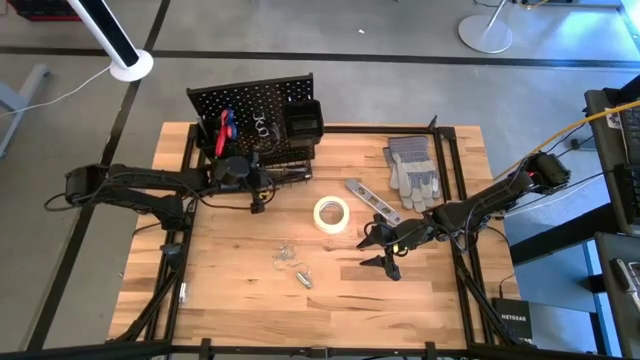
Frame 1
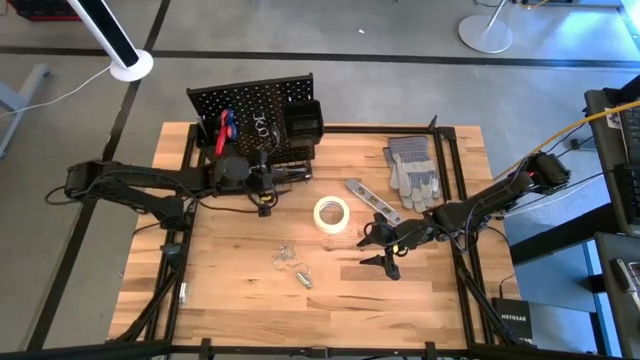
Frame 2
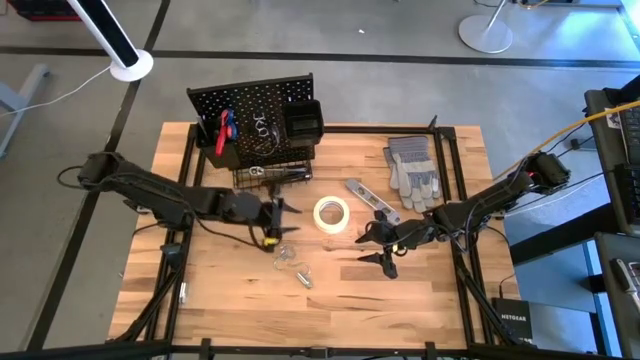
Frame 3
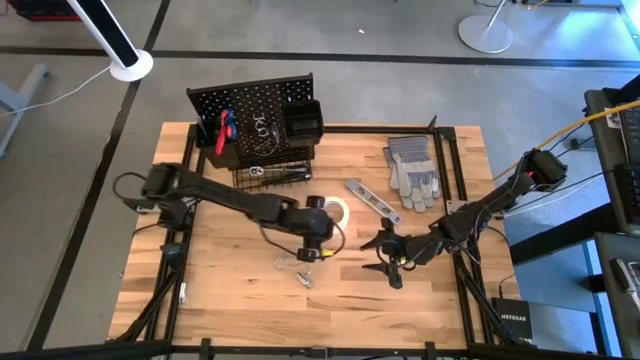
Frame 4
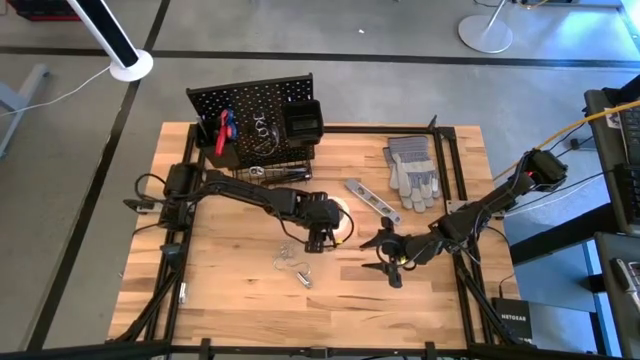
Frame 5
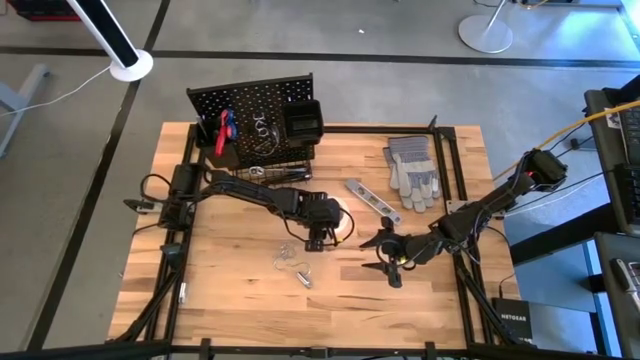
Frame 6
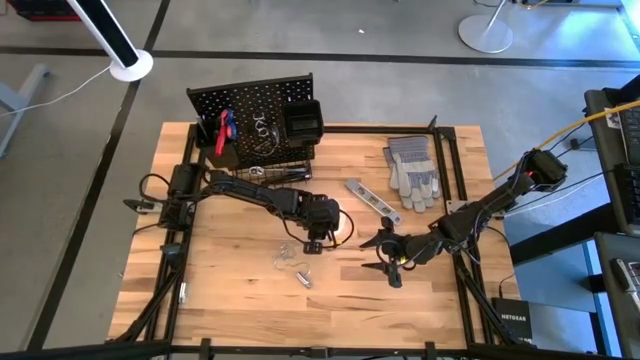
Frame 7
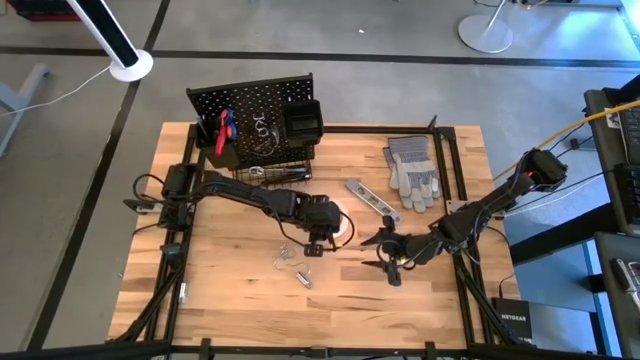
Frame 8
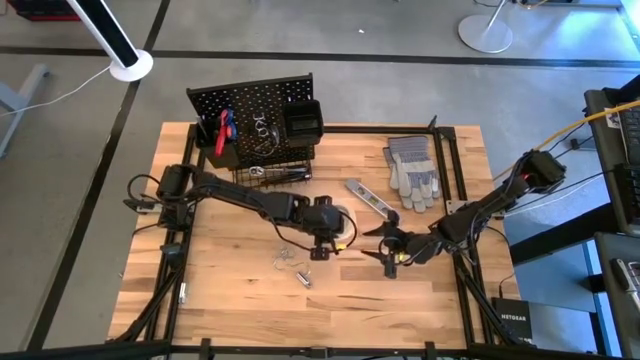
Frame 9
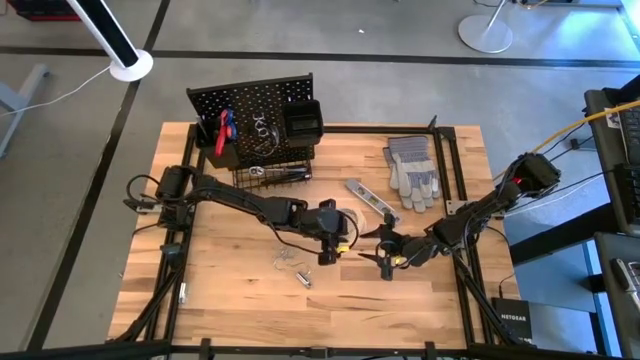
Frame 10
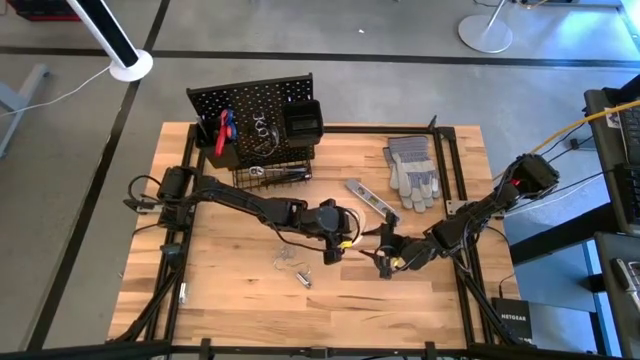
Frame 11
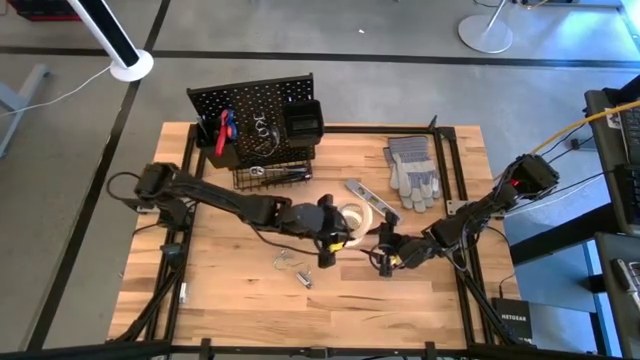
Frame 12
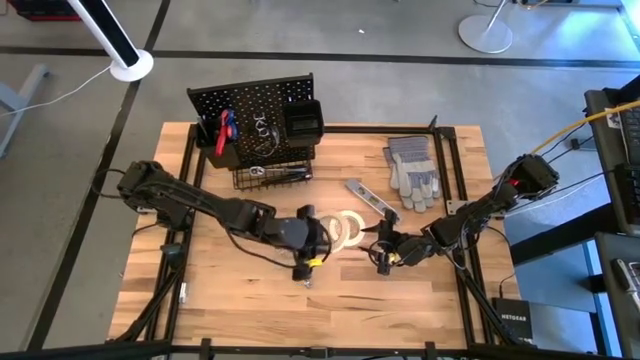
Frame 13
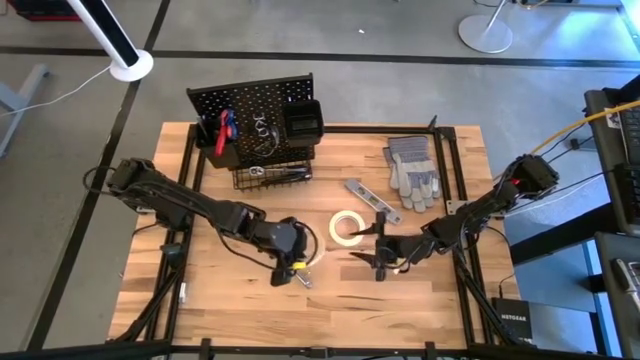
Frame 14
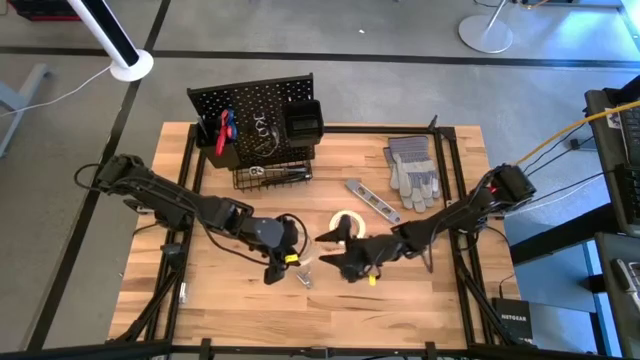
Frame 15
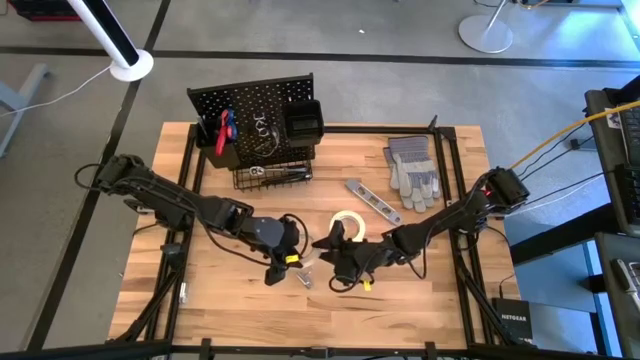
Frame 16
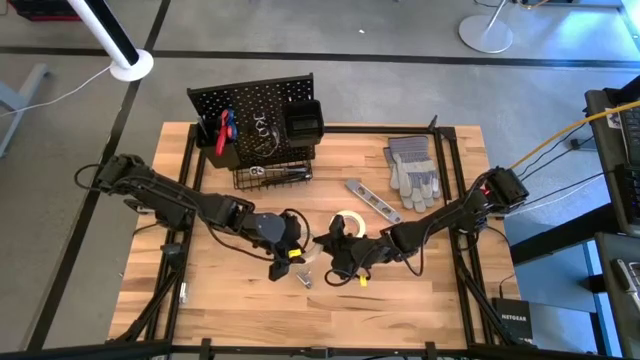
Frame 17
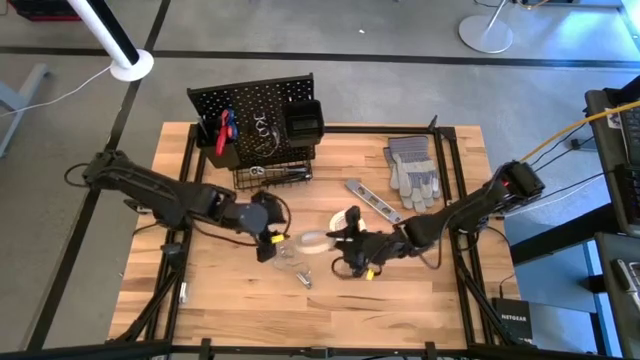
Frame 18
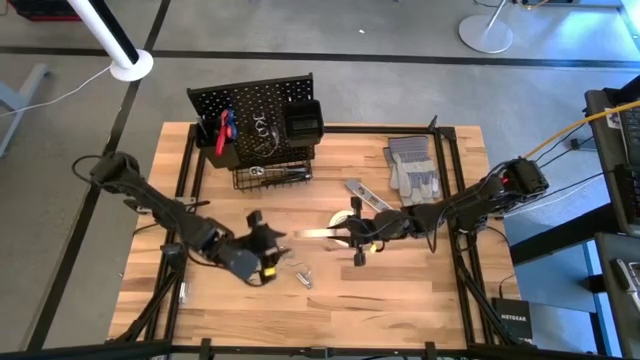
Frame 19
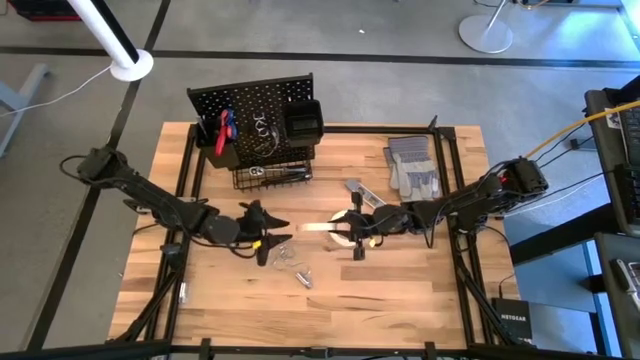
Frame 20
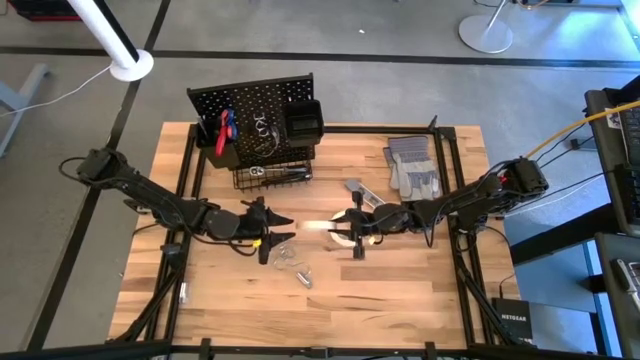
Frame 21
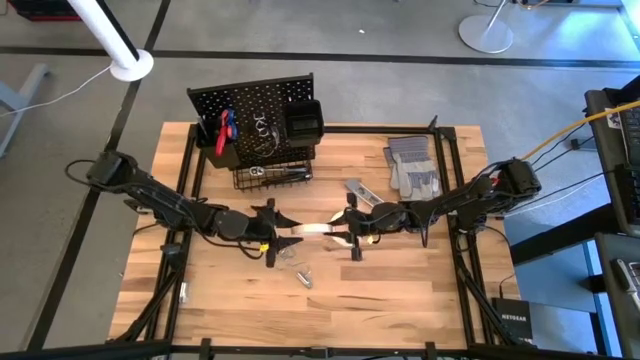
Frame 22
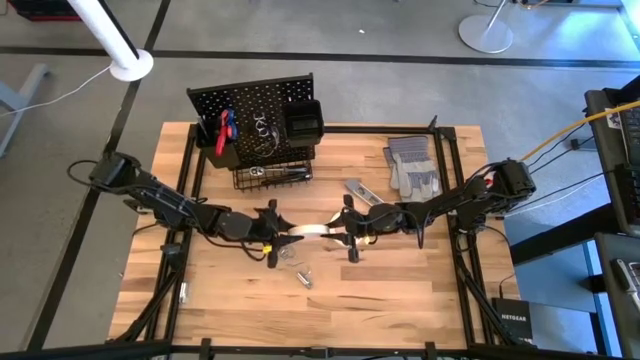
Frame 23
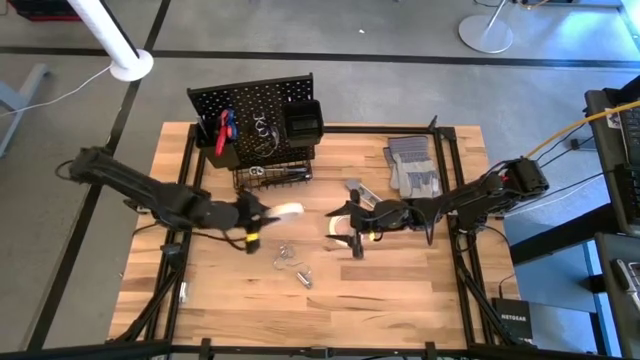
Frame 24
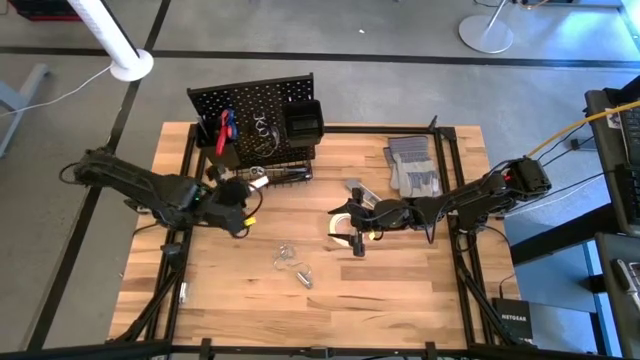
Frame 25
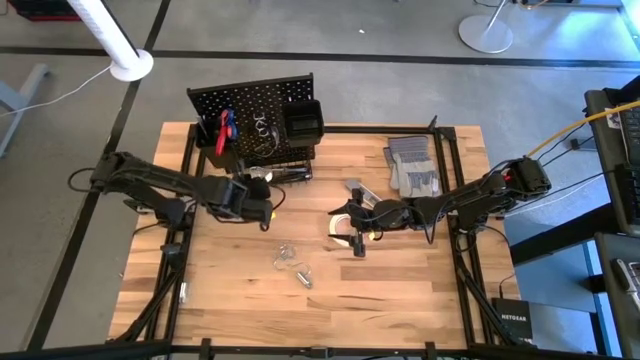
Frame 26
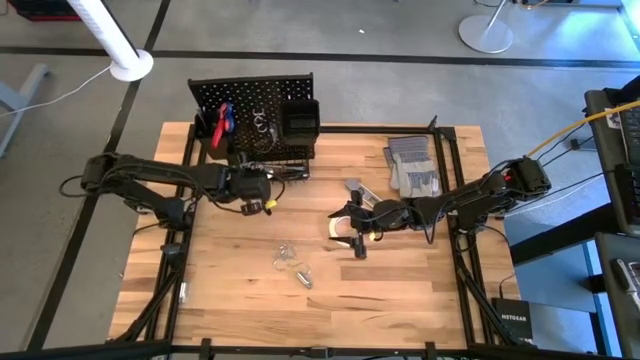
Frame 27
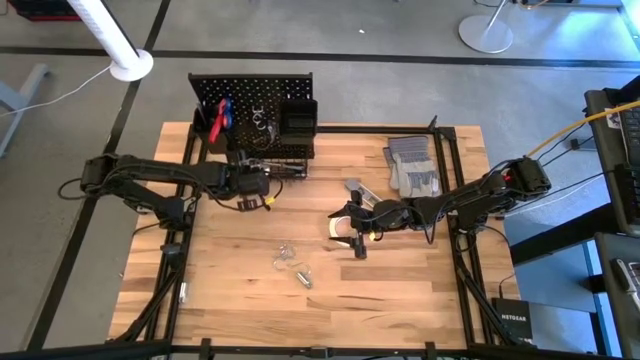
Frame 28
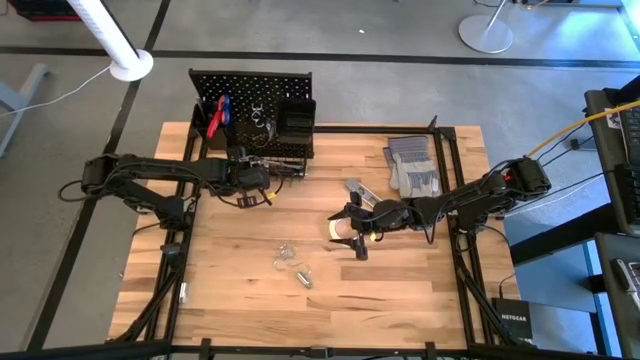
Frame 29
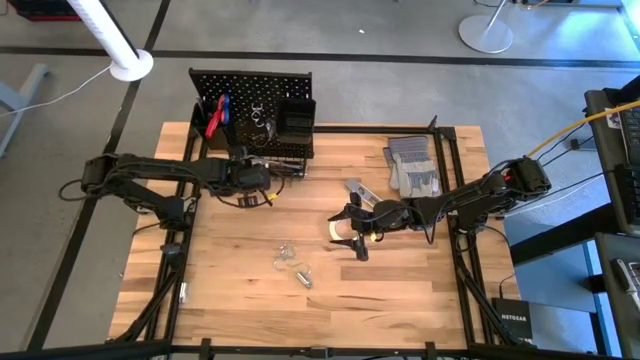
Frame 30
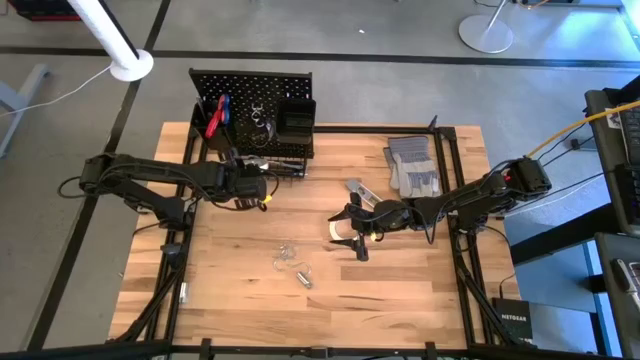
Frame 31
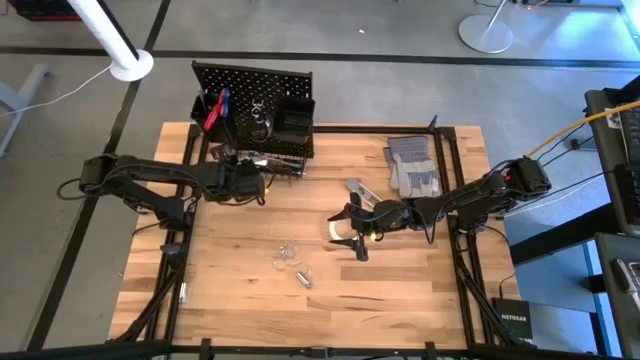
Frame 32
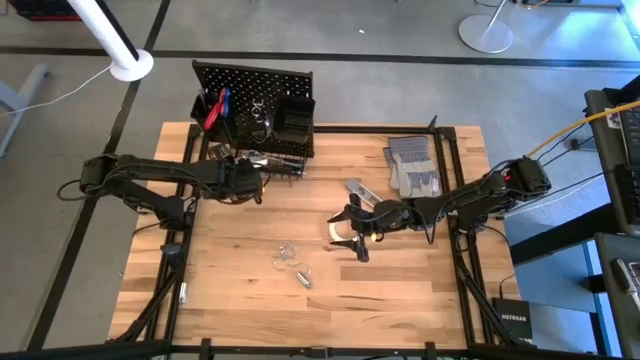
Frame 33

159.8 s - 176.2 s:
Task: Hang tools onto peg board
Put the masking tape into the black wire basket on the pegboard

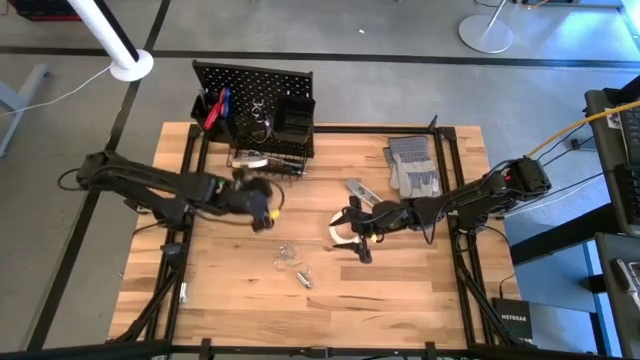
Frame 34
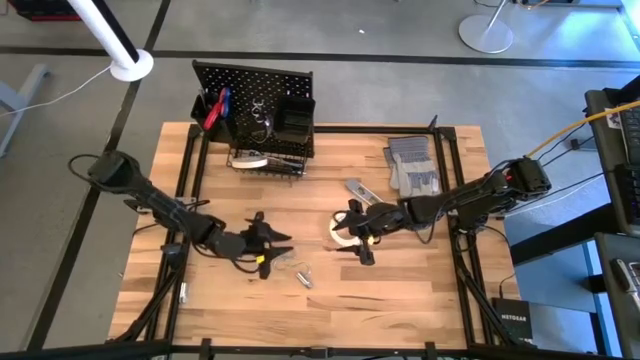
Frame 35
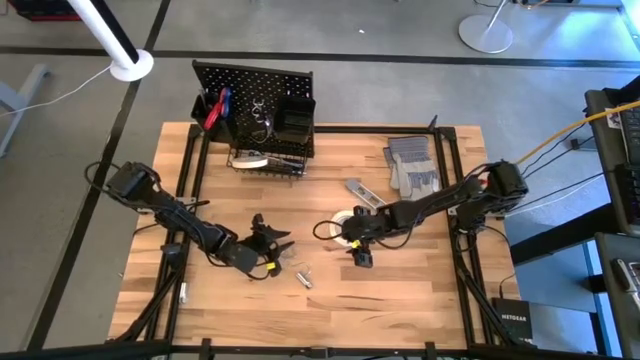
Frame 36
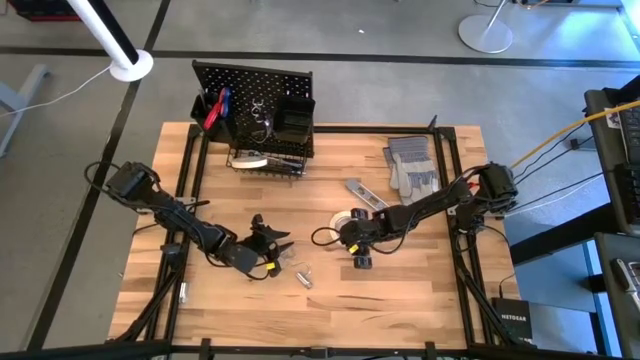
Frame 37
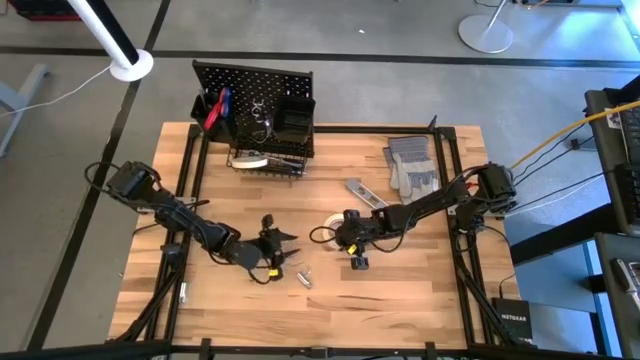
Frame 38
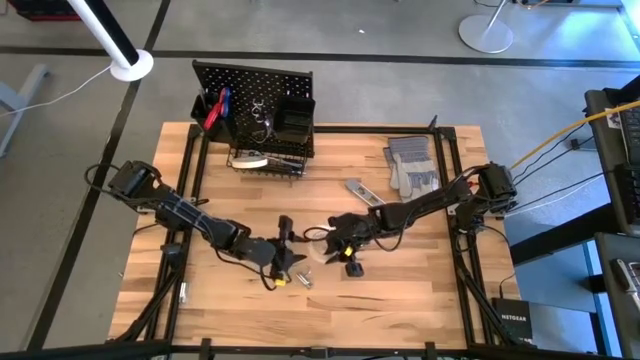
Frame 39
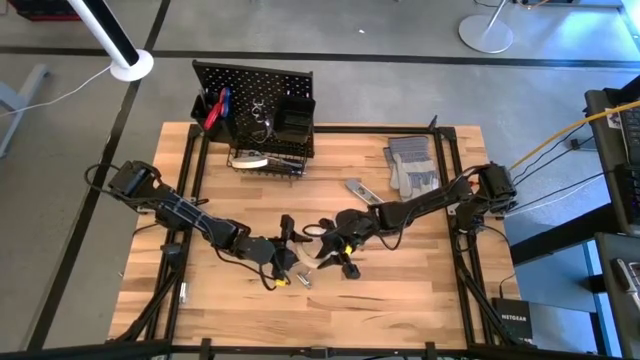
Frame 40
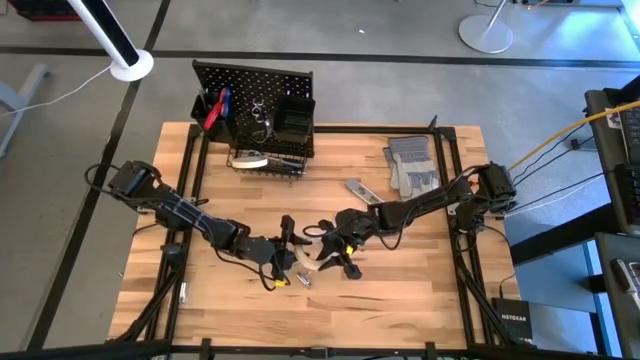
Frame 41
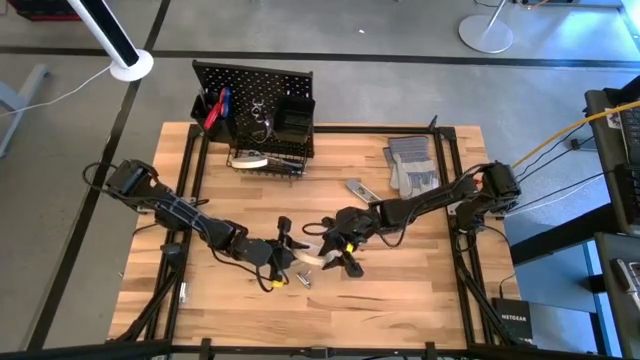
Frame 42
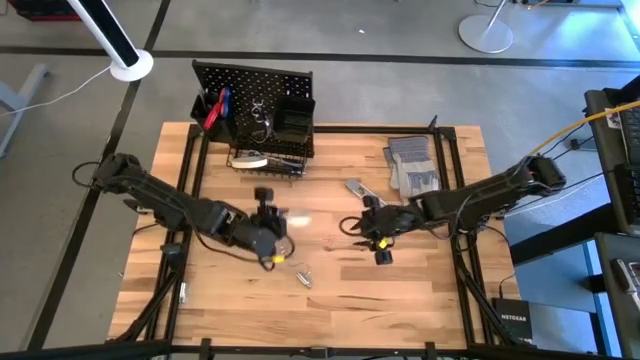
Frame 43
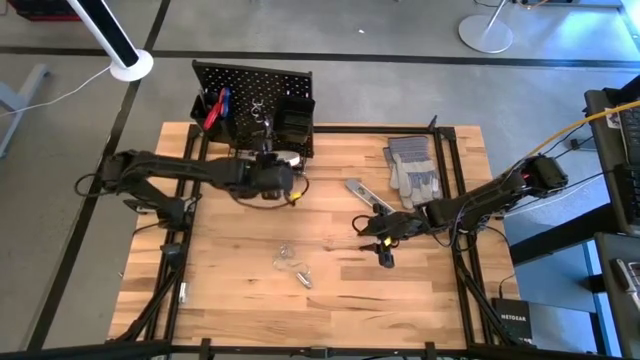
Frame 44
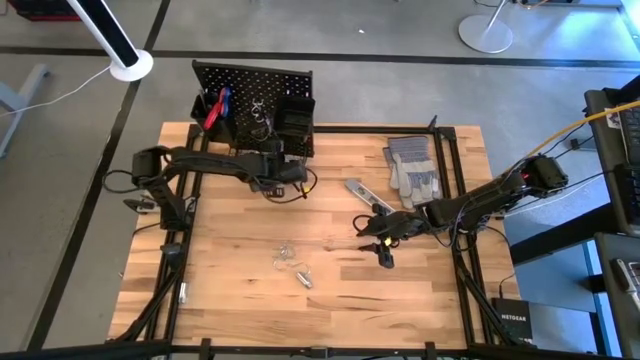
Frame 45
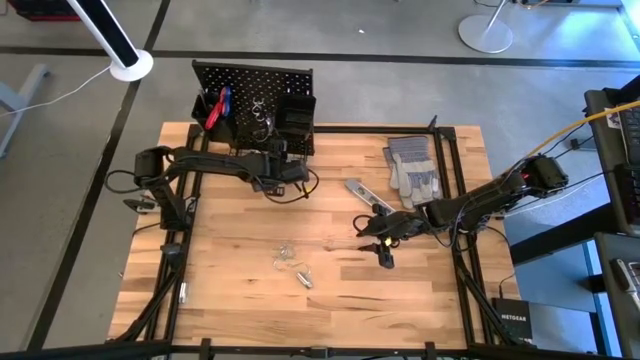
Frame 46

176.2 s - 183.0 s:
Put the masking tape into the black wire basket on the pegboard
